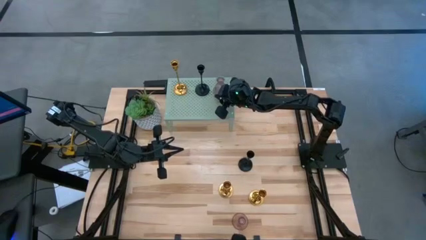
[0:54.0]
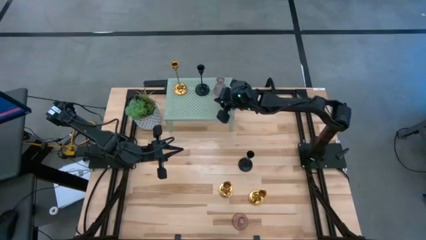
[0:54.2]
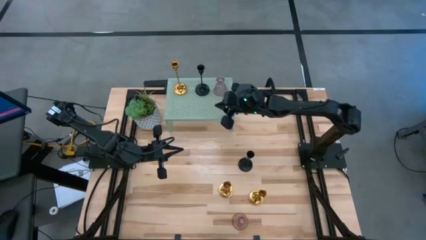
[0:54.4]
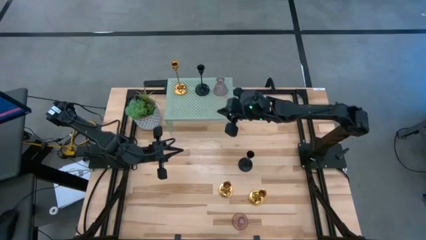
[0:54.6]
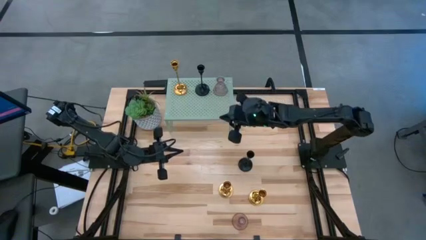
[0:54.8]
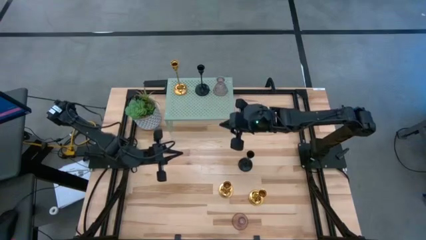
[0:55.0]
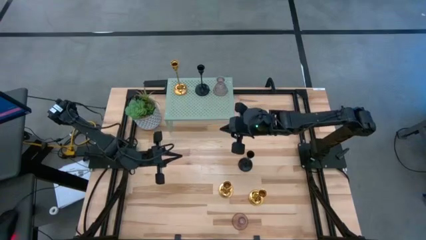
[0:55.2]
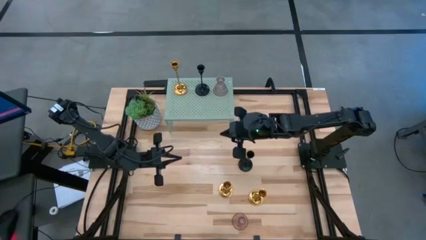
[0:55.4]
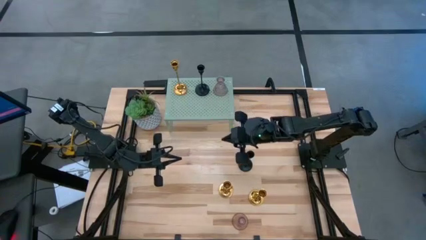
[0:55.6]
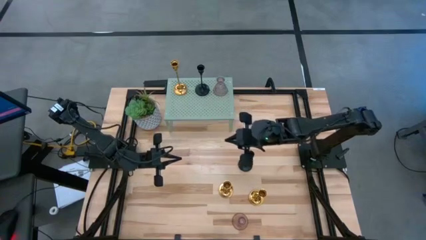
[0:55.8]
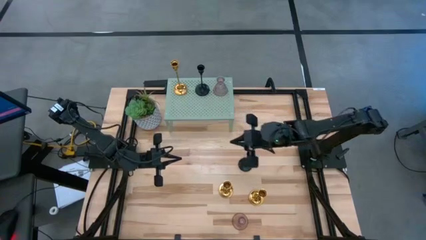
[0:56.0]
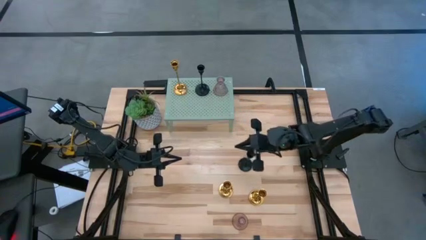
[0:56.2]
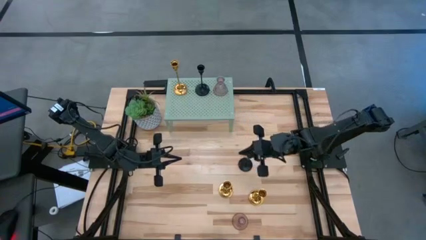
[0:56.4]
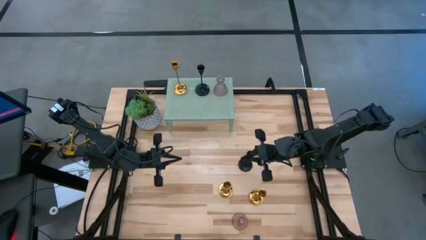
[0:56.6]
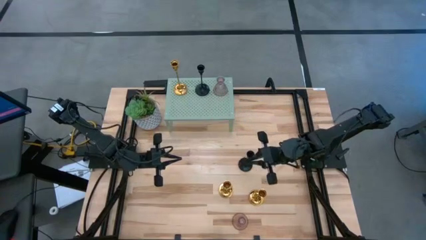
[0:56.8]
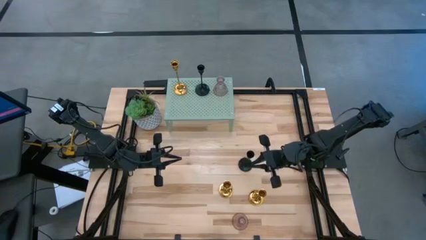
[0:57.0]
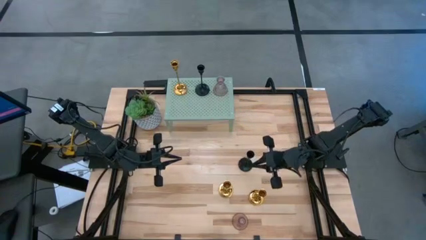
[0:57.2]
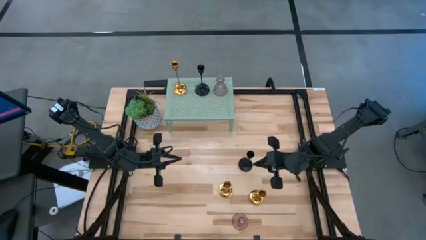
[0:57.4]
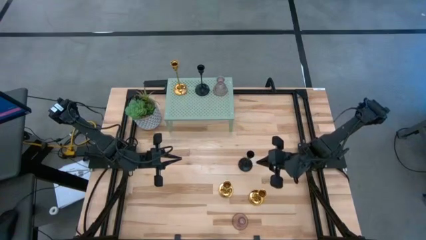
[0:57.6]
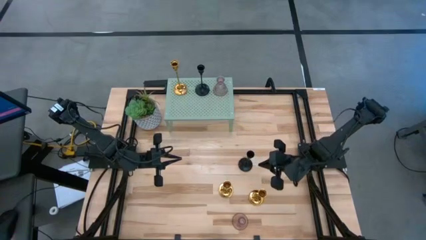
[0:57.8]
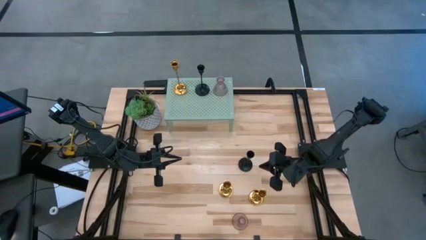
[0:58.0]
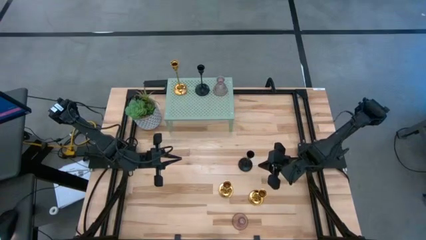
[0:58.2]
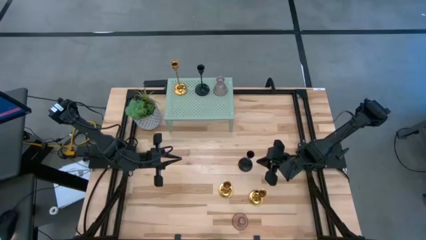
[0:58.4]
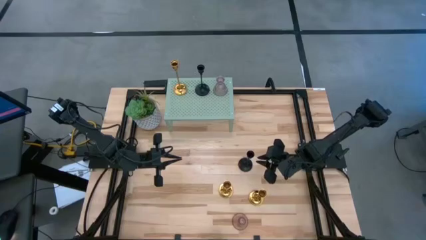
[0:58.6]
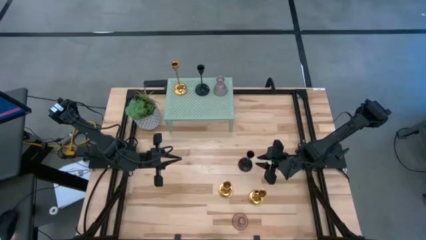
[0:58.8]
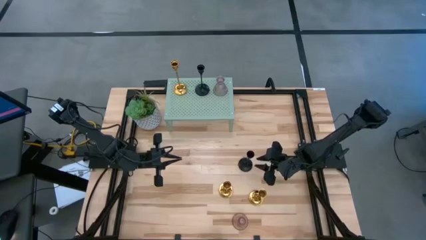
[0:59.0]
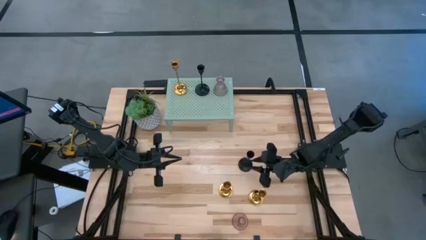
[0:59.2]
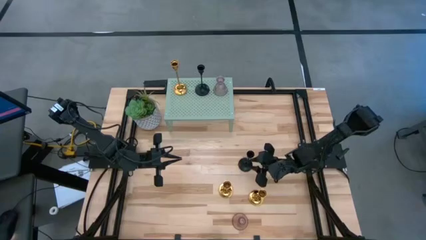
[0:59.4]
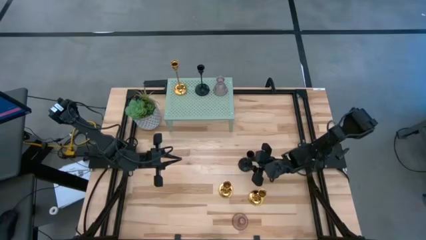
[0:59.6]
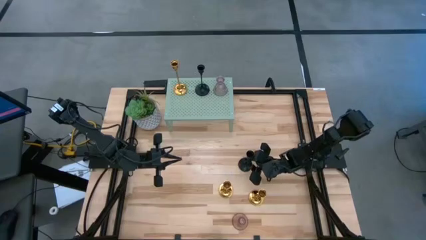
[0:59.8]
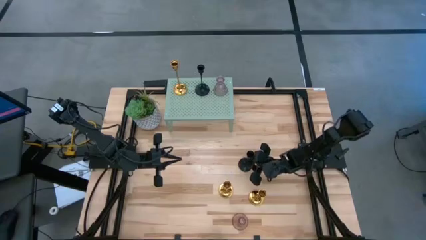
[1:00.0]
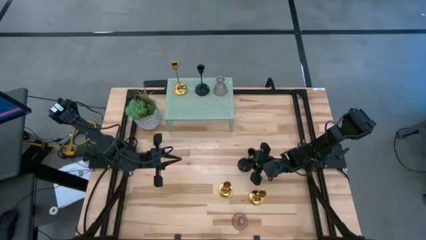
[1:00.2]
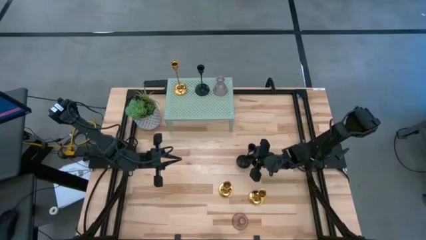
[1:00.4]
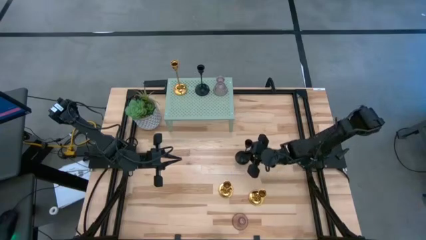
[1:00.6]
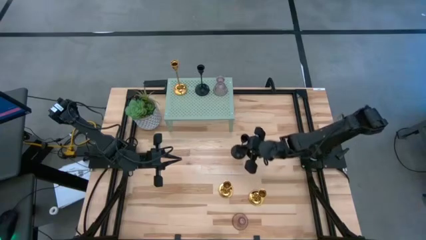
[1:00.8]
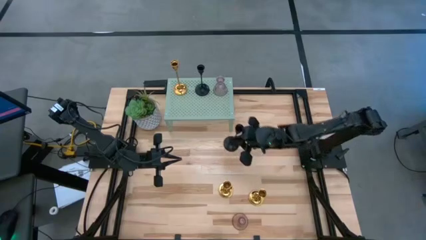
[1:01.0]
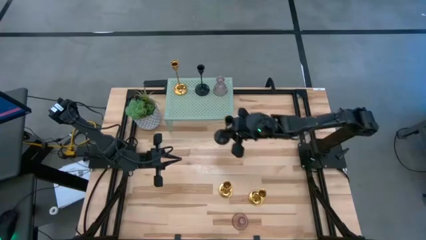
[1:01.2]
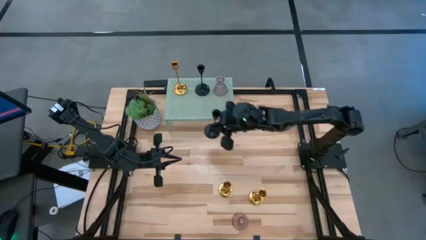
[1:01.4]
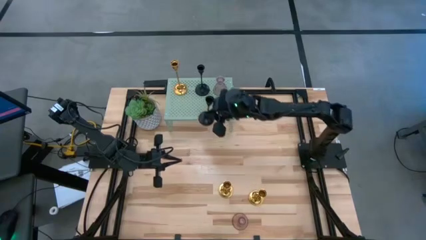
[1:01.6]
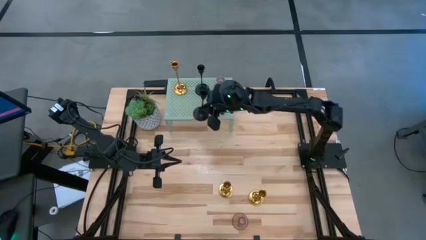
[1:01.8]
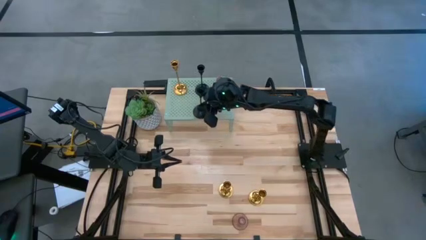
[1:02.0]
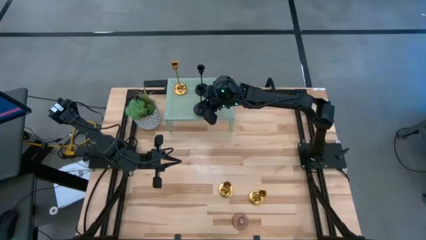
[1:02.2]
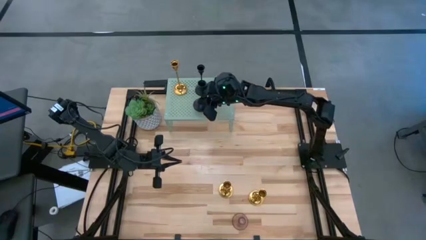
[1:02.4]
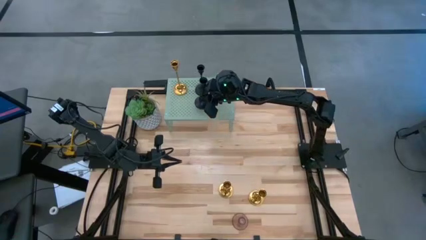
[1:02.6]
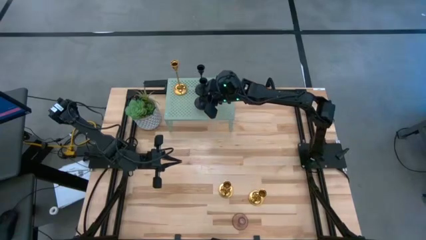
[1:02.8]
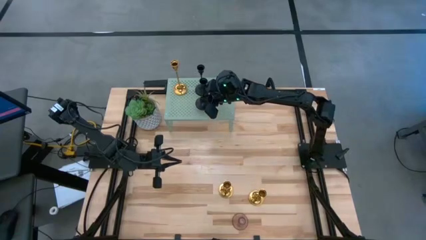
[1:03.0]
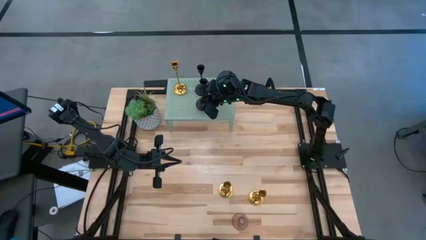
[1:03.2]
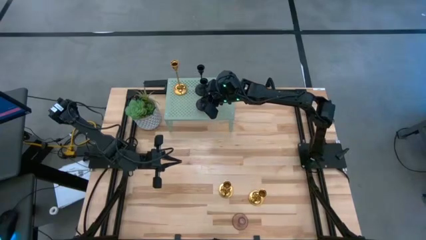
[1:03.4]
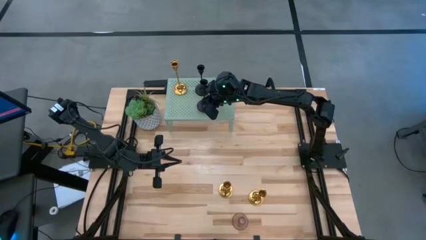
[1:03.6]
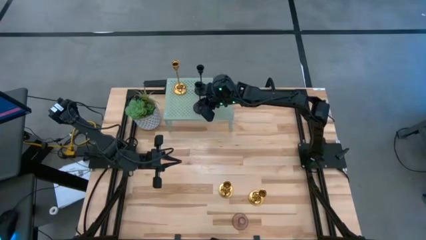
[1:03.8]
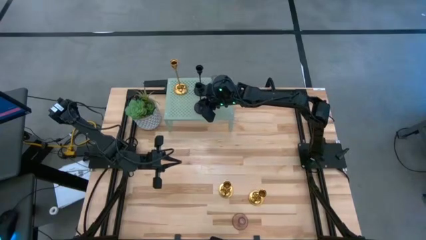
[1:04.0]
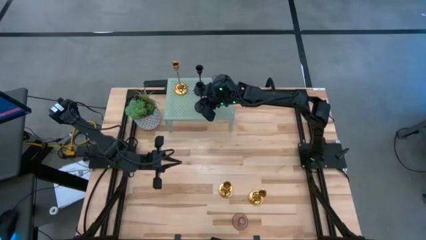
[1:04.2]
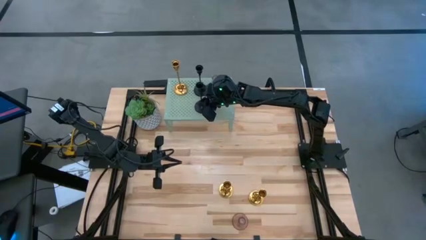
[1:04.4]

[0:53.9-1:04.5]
Task: Pick & Place candle stick holders
Put the black candle holder on the shelf aligned with the other black candle holder

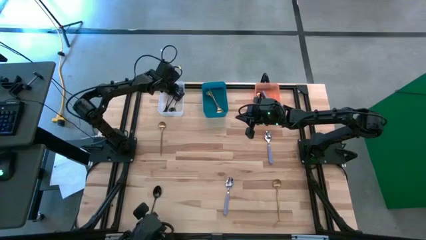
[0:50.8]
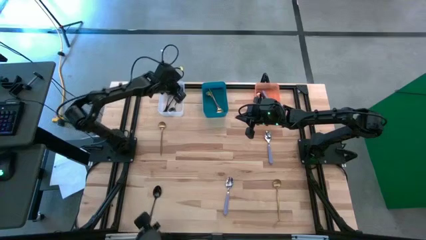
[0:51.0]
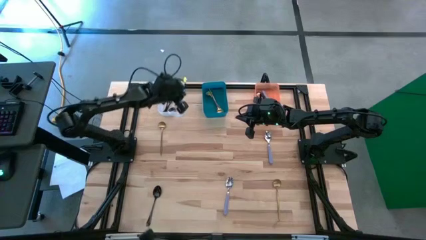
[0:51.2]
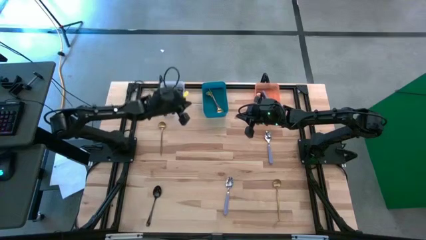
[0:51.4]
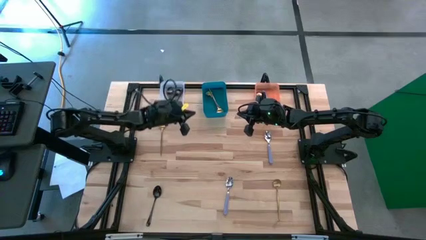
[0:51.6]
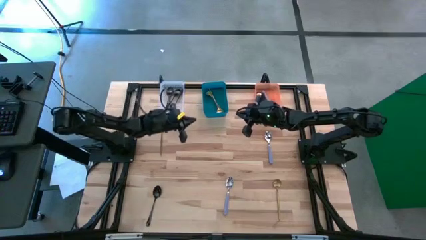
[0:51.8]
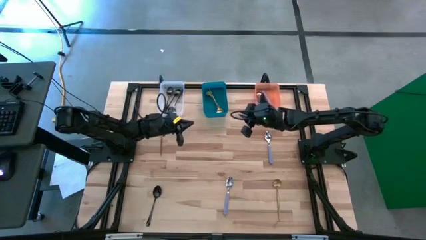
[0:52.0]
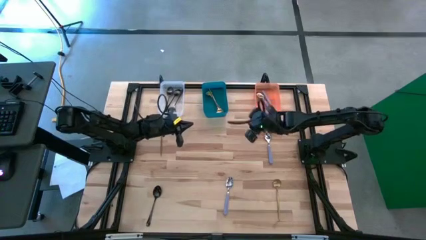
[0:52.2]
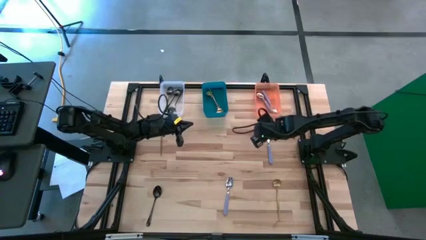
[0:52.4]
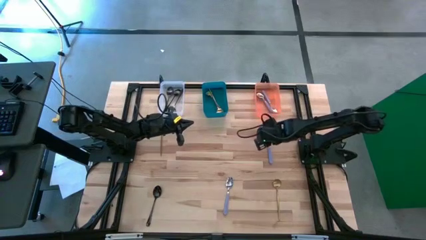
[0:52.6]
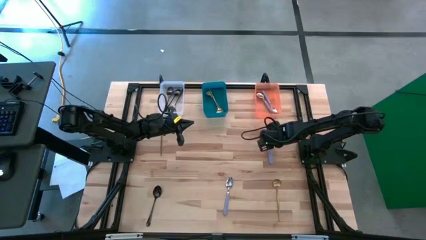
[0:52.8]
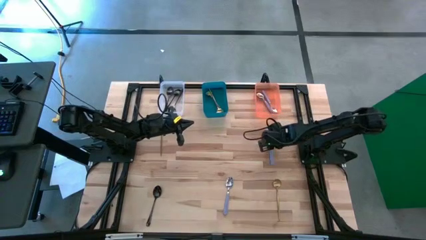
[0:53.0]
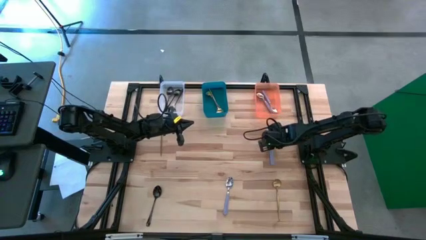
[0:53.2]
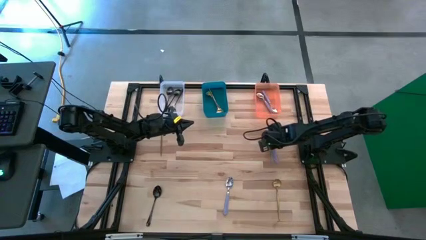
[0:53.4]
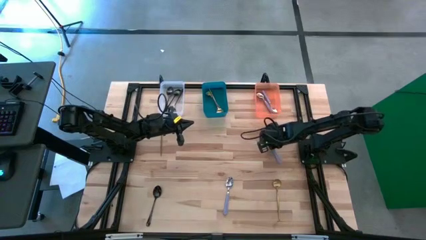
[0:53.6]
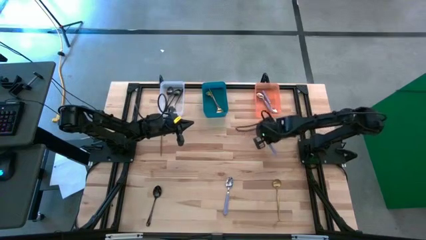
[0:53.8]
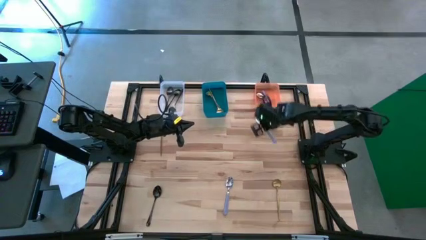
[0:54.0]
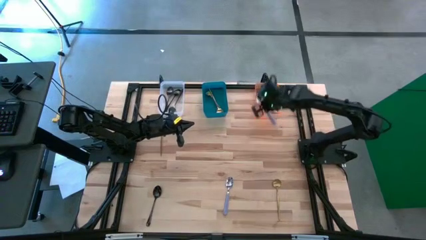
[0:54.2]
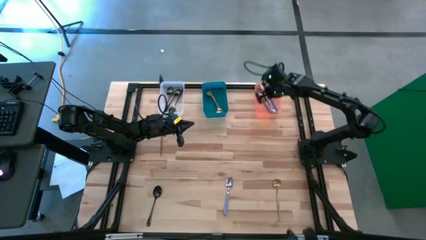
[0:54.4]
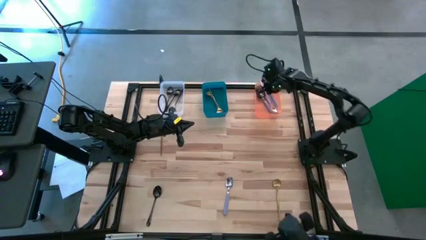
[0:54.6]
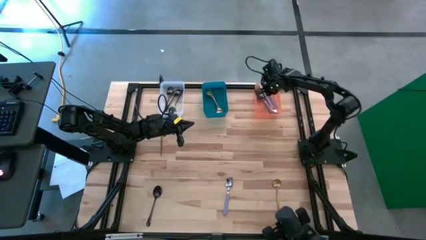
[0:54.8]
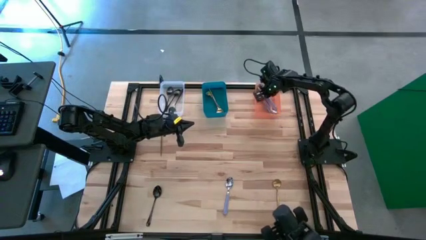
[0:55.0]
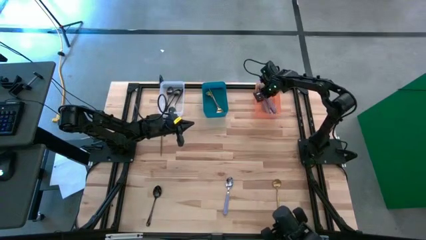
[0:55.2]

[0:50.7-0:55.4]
Task: Sort silverware by color (type)
Put the top purple spoon into the orange bin
